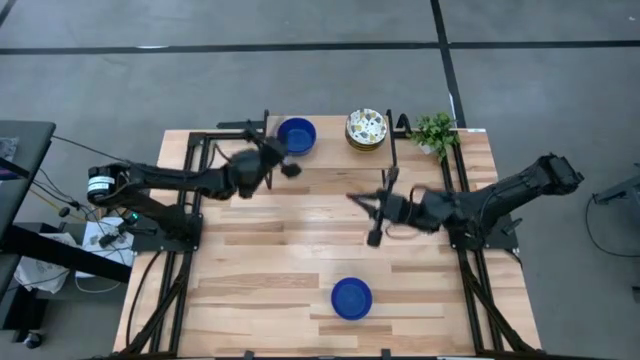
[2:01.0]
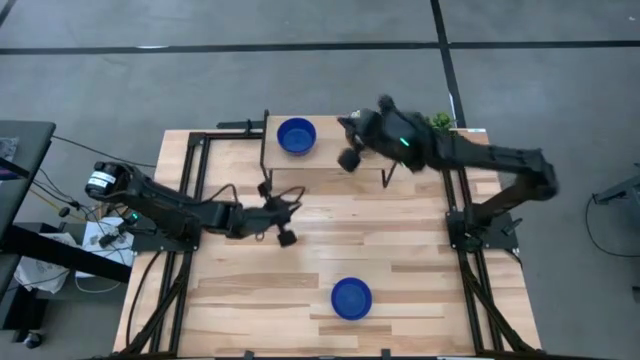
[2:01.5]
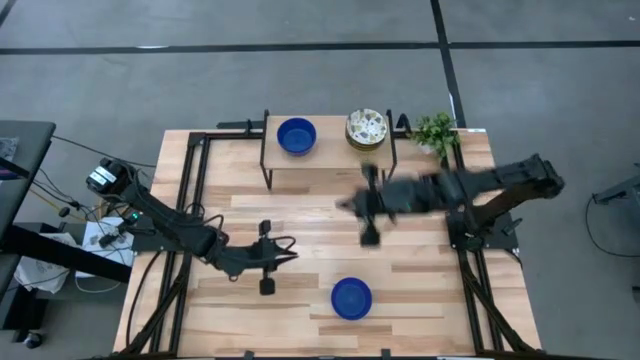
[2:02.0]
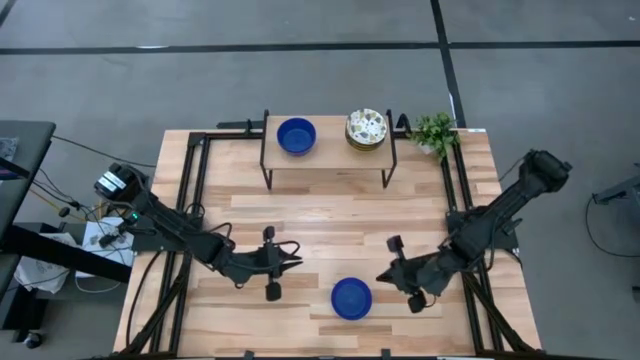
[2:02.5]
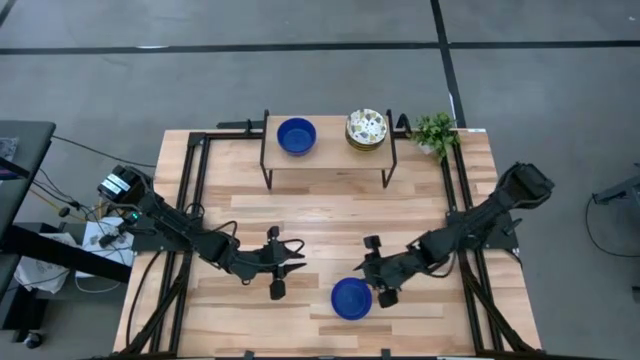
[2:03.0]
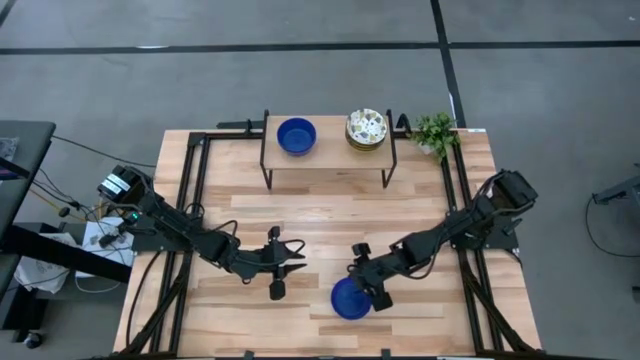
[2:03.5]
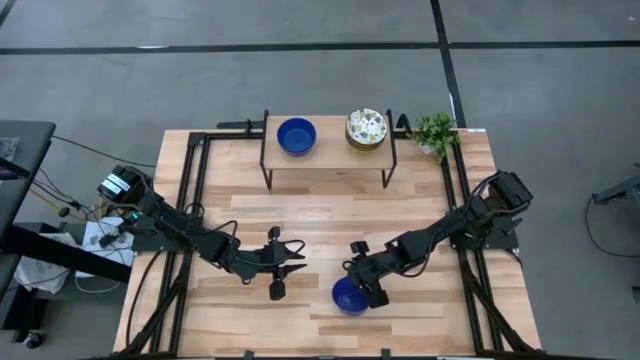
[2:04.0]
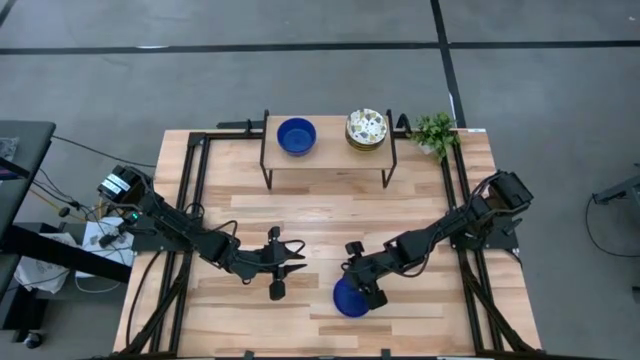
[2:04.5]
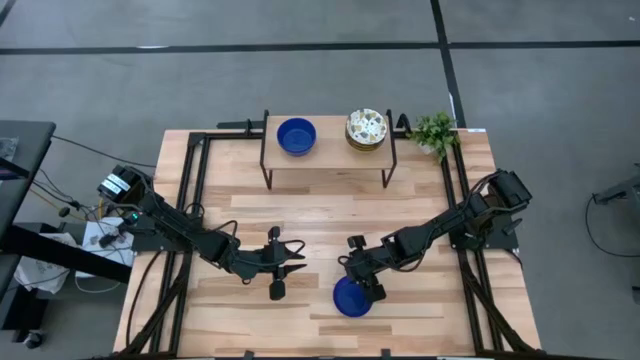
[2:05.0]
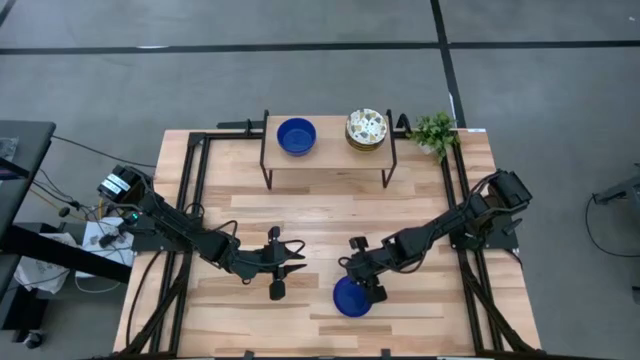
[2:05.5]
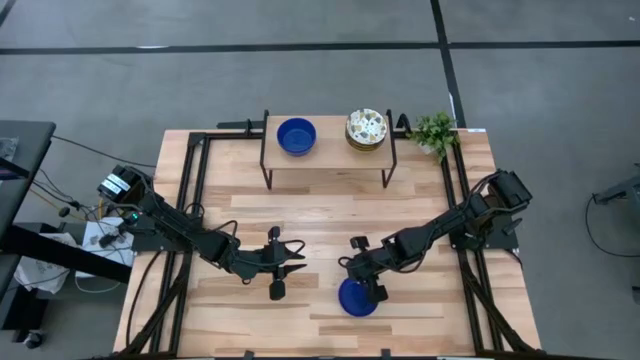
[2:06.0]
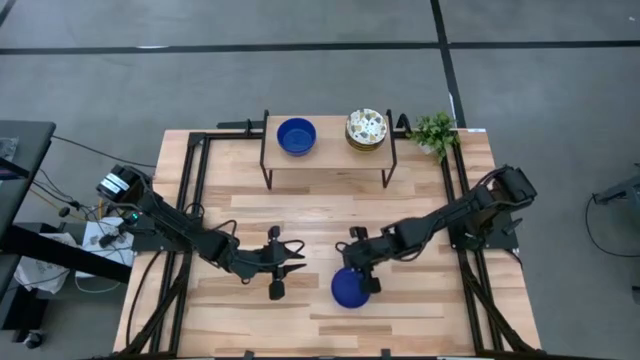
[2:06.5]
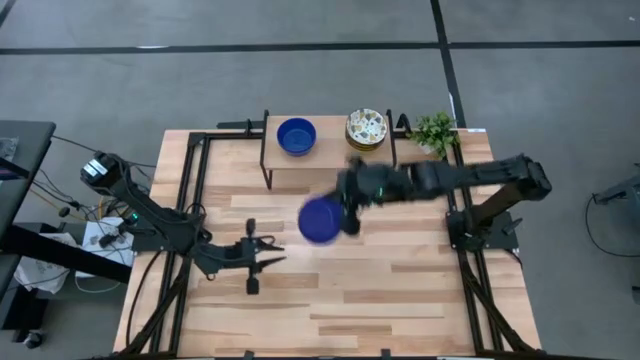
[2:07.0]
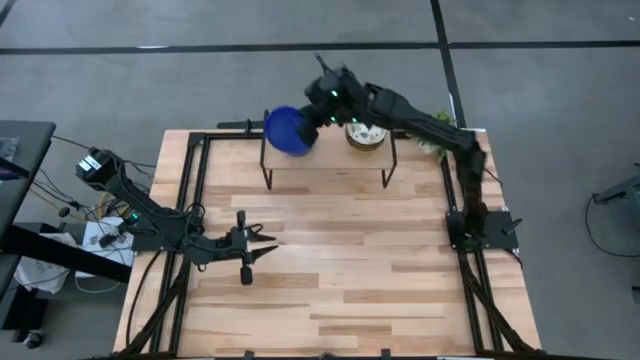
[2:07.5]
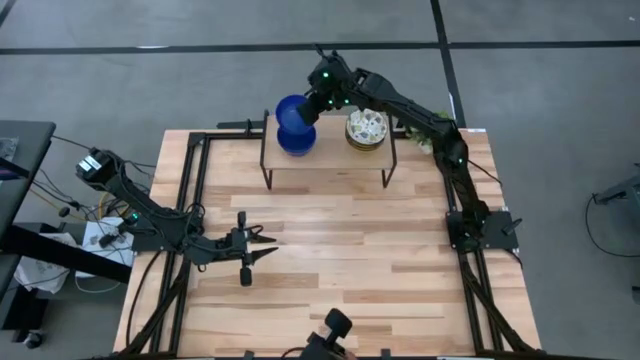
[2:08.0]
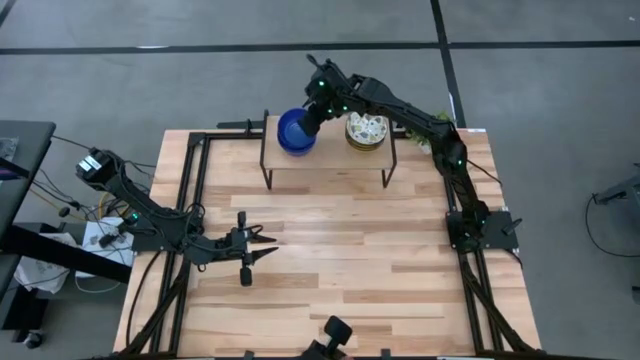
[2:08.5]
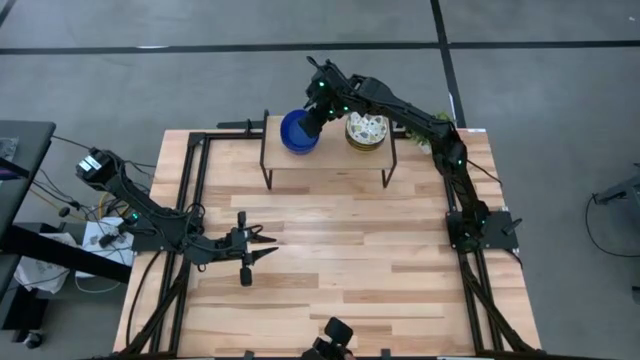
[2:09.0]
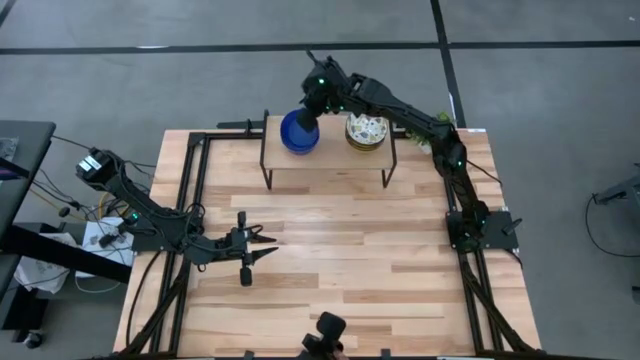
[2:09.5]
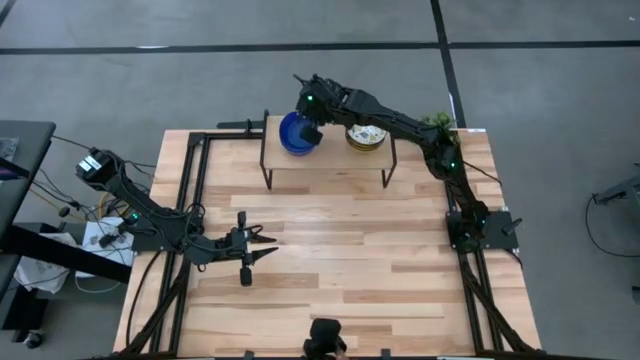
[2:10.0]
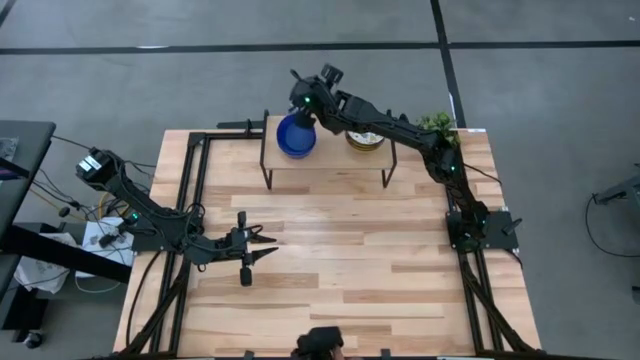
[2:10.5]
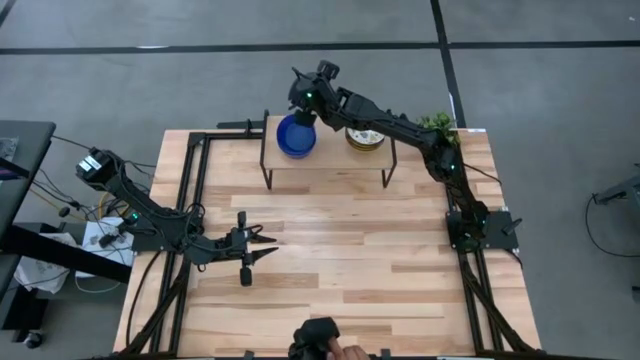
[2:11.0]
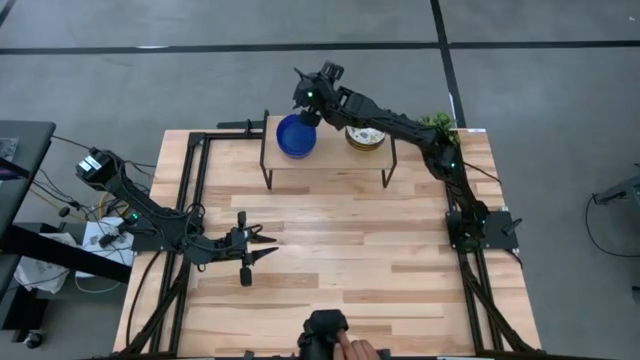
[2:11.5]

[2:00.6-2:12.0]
Task: Pick & Place Mini bowls
Stack the blue bowl on top of the blue bowl on the shelf

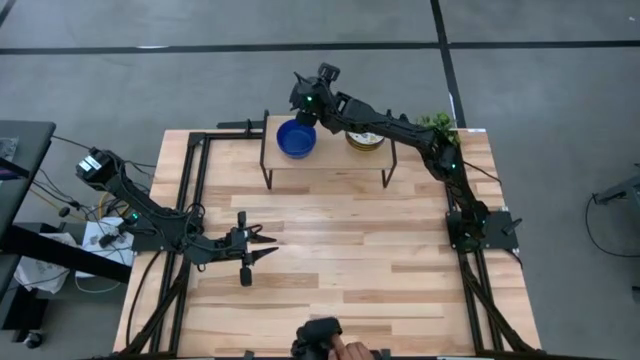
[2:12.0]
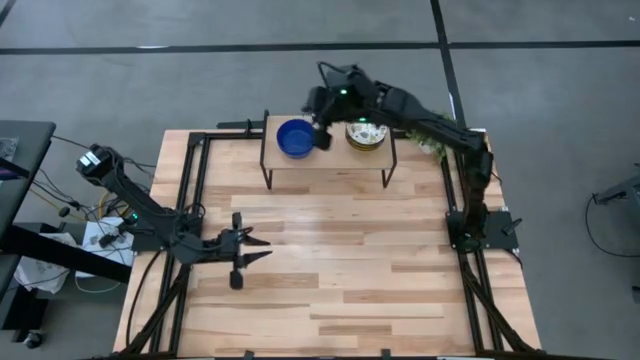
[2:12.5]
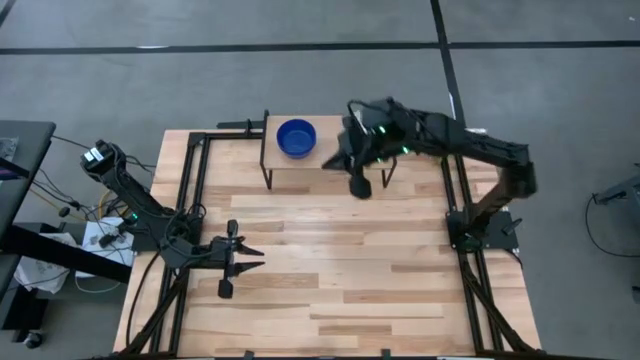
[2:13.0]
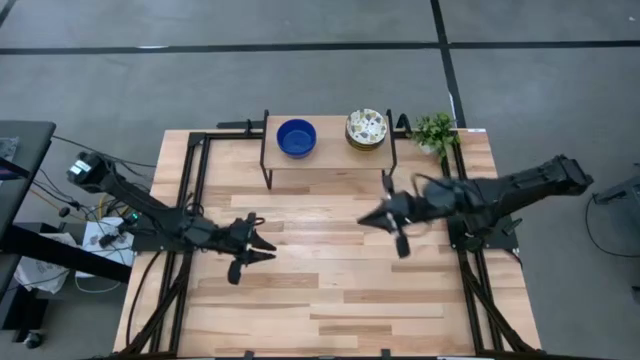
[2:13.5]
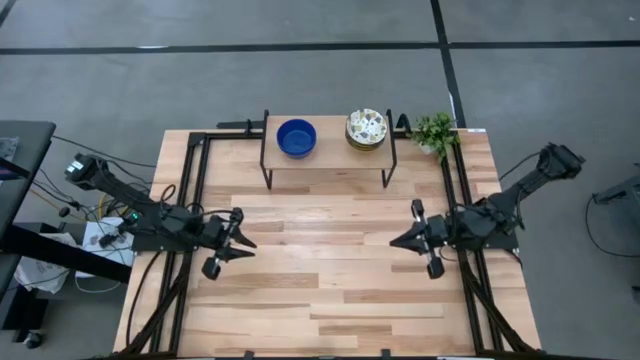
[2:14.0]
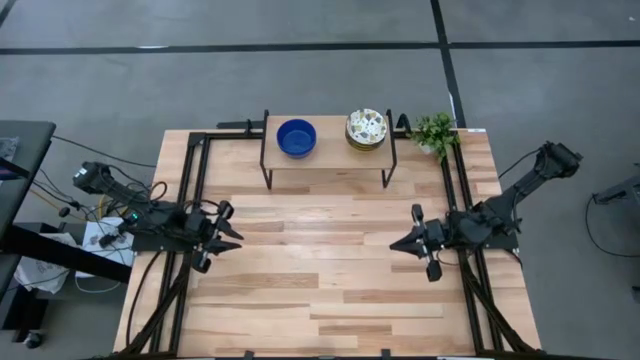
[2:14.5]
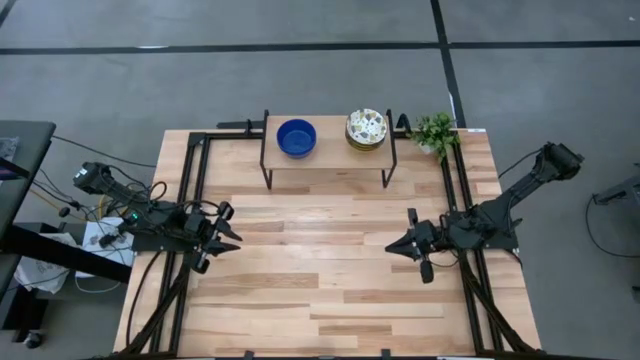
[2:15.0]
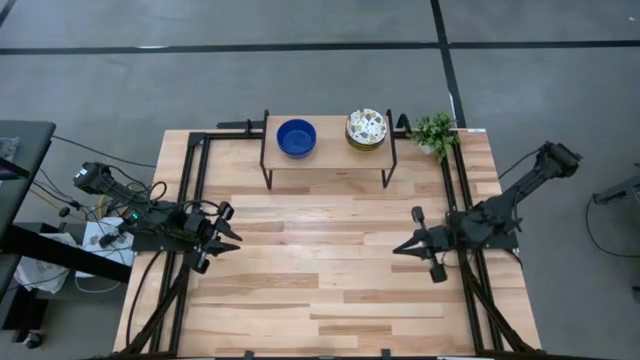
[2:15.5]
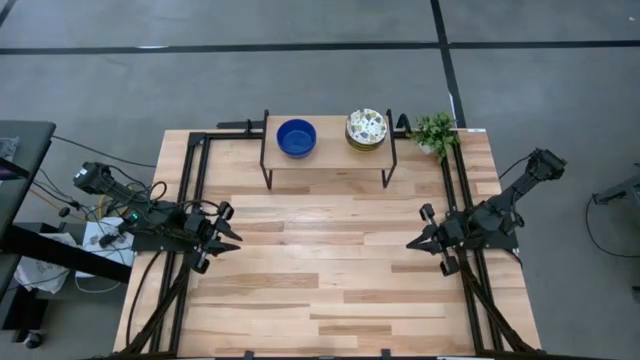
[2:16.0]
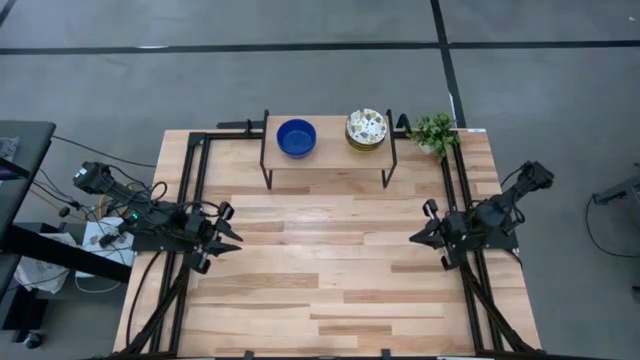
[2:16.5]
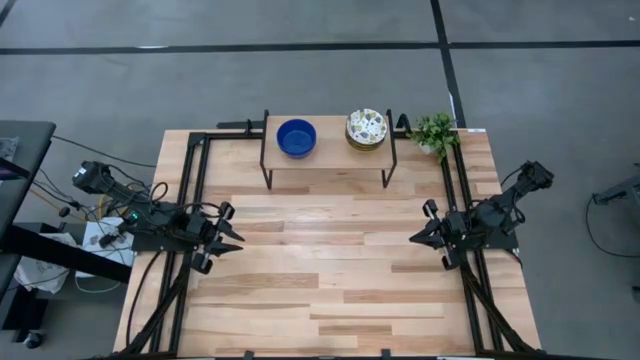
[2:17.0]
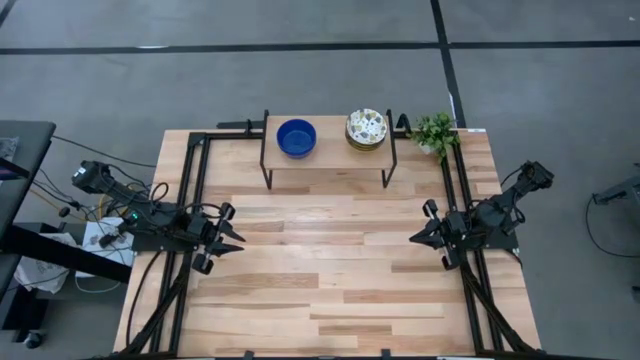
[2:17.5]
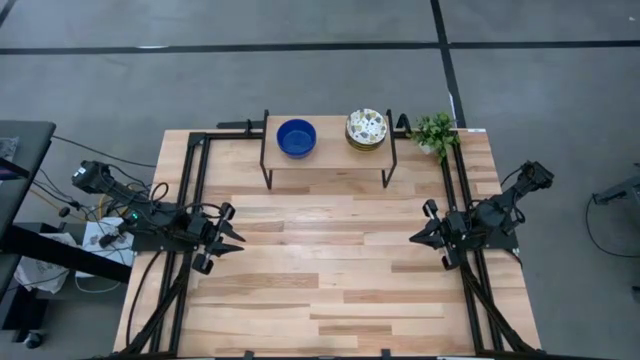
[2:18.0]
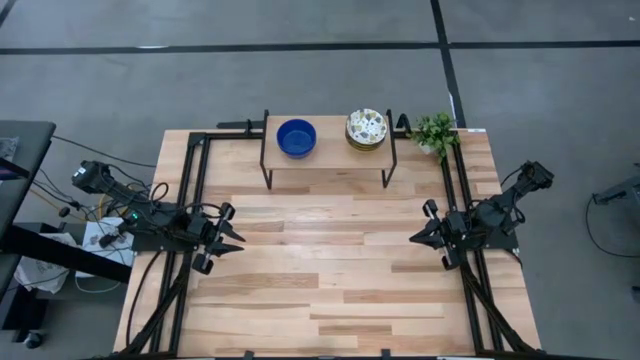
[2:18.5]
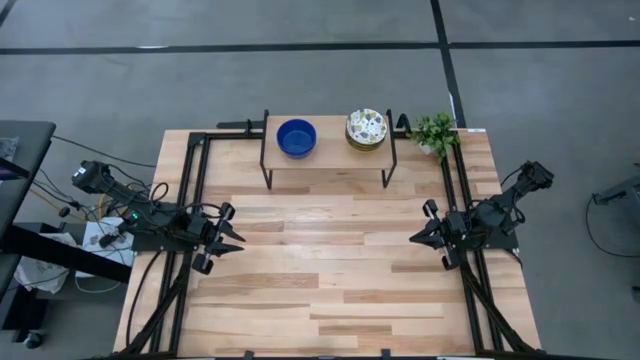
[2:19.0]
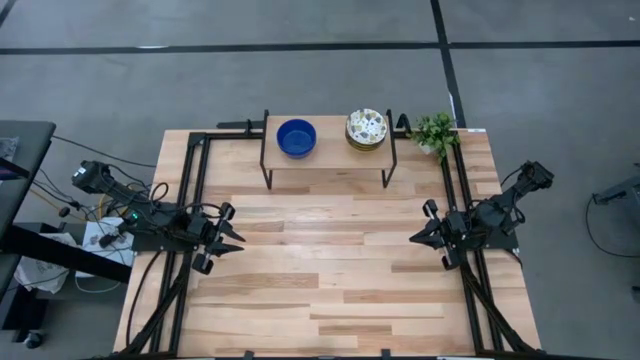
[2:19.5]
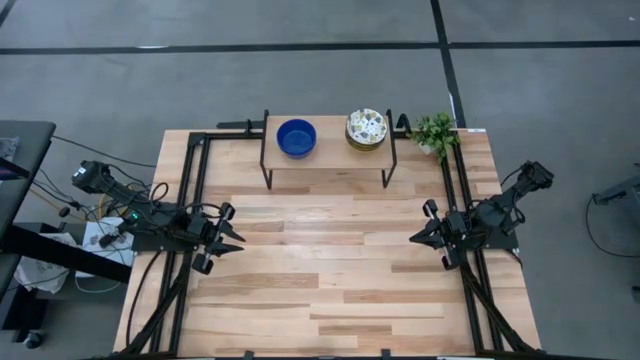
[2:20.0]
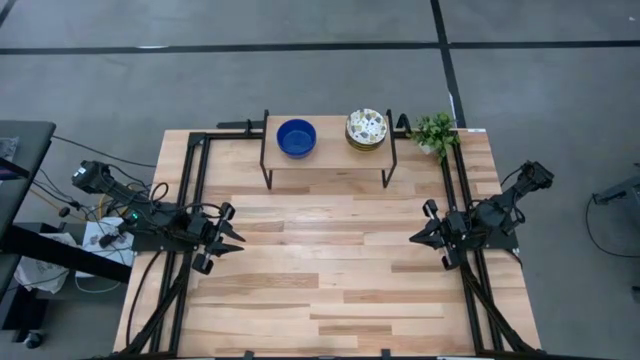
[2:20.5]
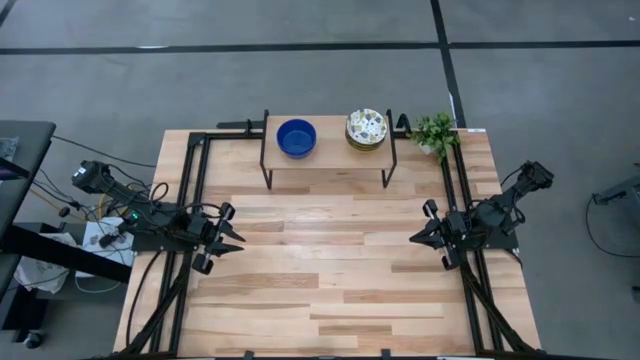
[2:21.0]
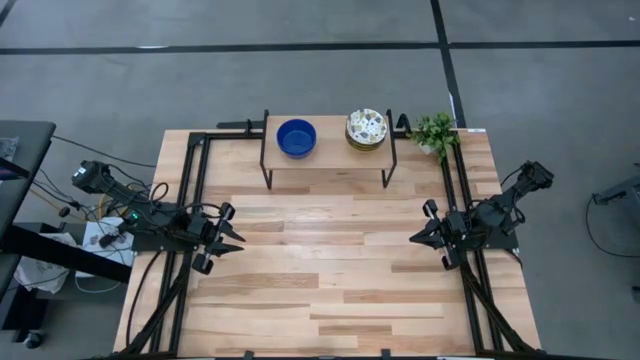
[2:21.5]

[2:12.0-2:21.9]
Return to Home Position

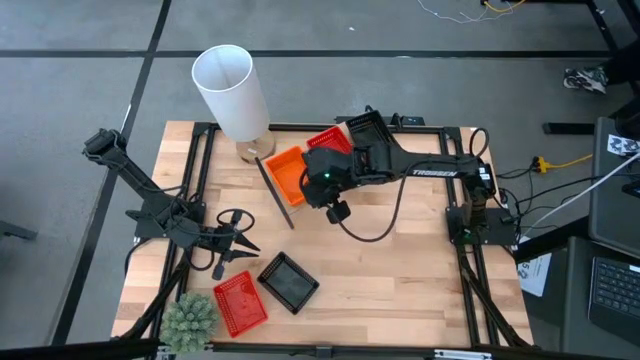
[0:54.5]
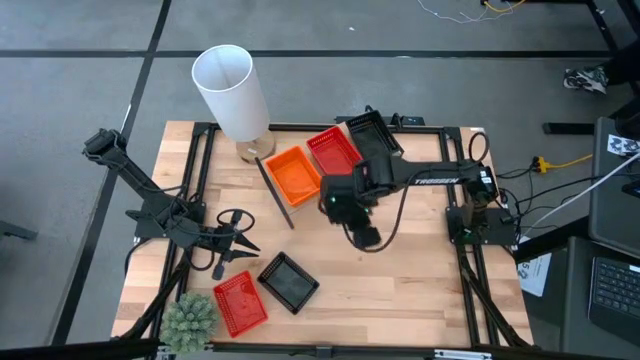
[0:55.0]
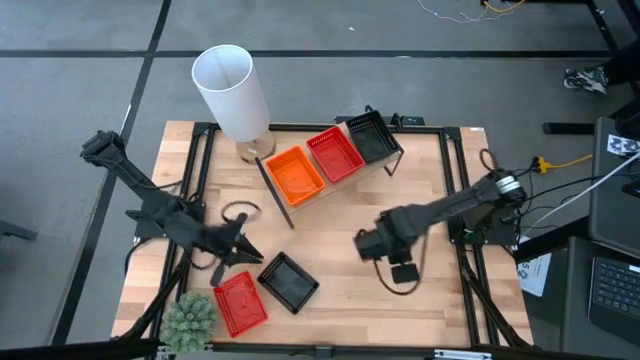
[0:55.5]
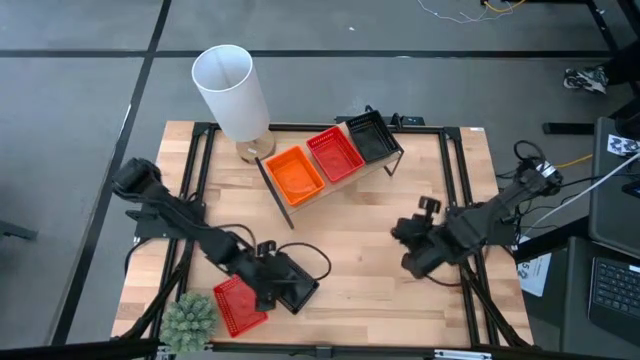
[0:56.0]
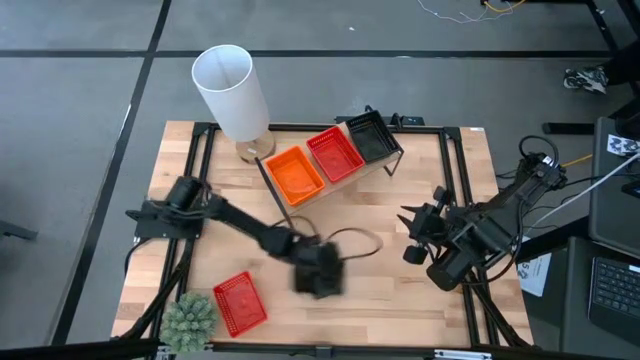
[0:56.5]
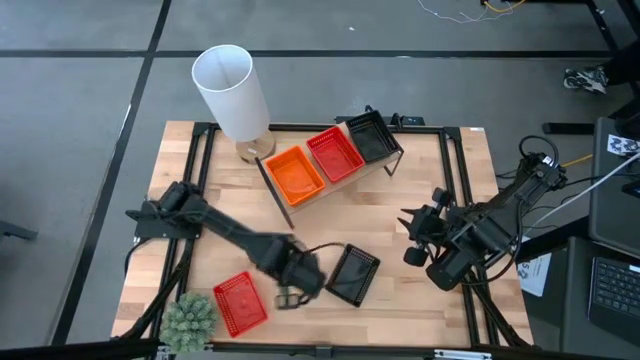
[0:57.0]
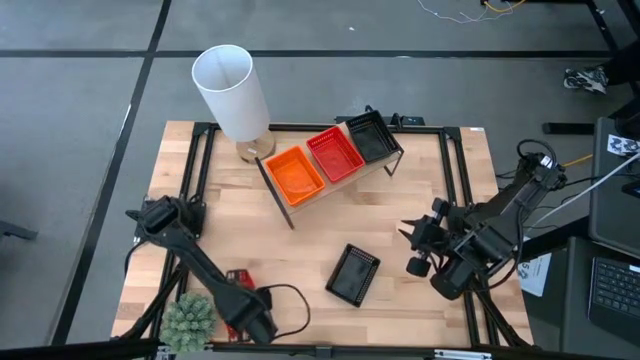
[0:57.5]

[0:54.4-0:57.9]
Task: Stack baskets on shelf by color
Move the baskets to the center of the table
